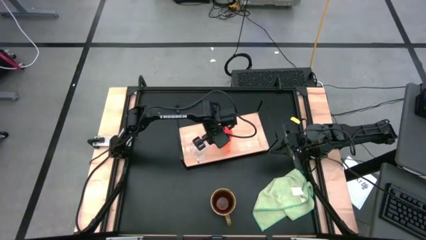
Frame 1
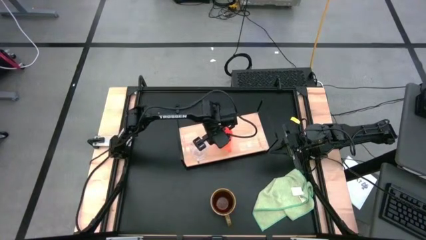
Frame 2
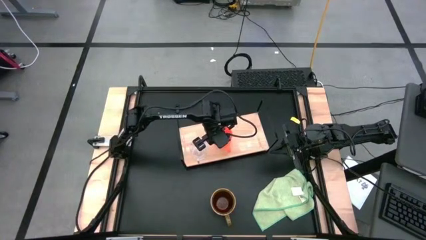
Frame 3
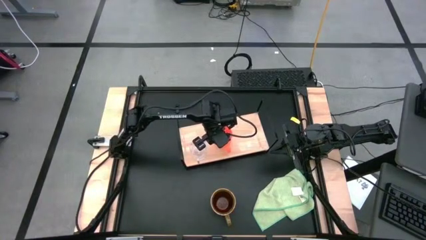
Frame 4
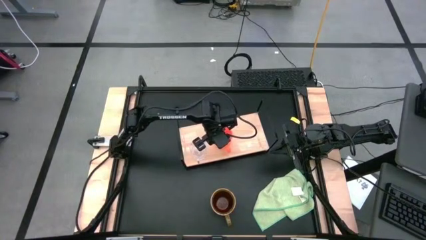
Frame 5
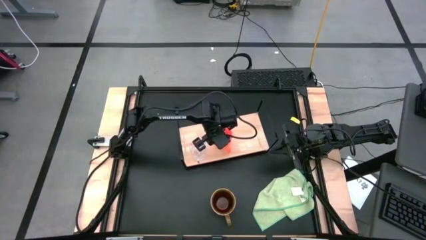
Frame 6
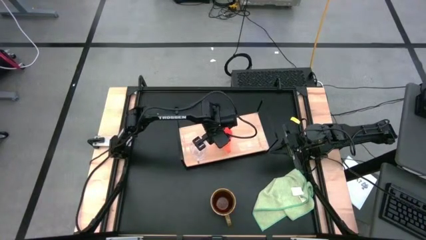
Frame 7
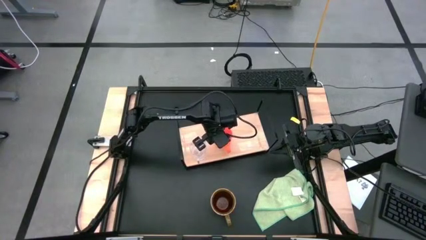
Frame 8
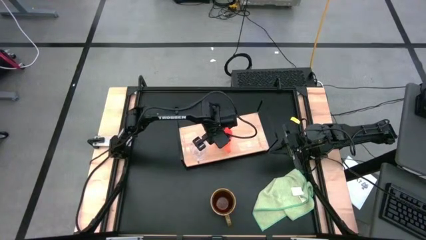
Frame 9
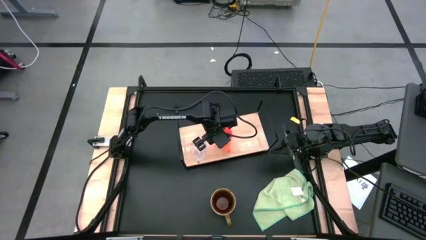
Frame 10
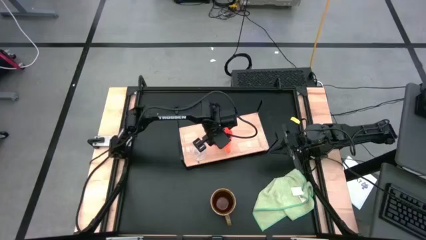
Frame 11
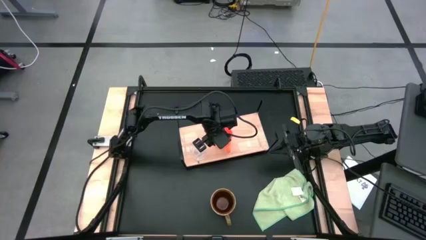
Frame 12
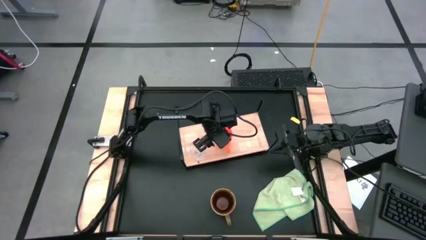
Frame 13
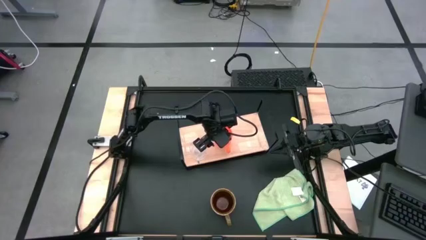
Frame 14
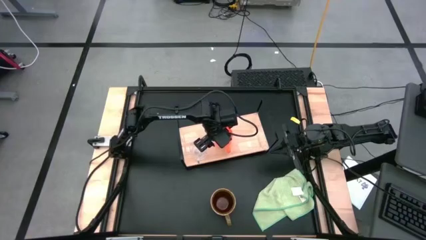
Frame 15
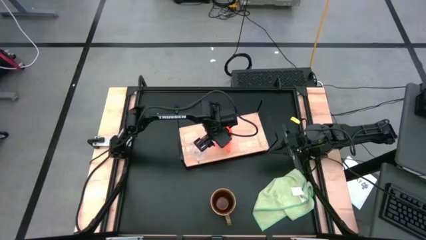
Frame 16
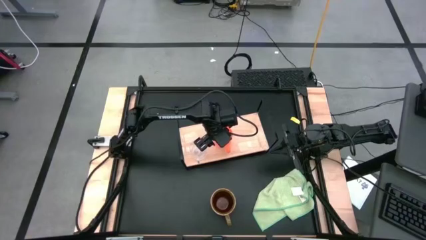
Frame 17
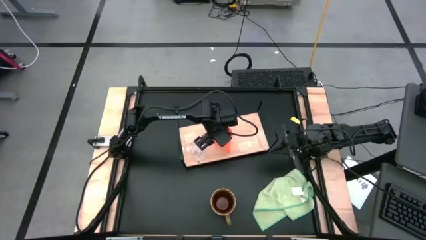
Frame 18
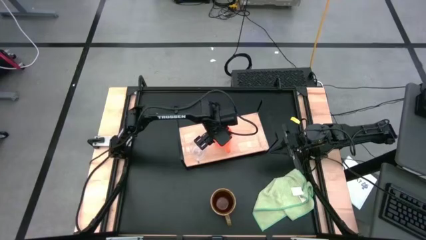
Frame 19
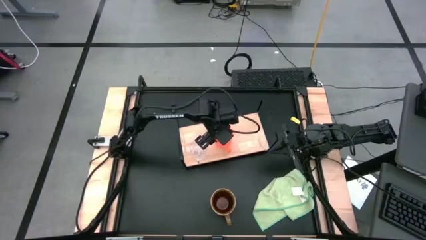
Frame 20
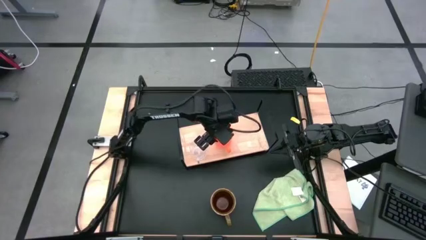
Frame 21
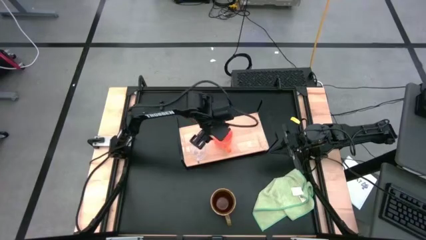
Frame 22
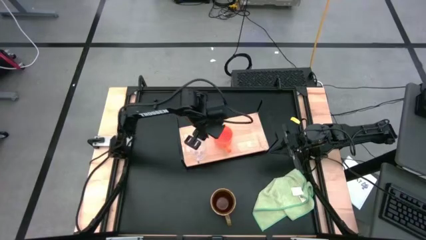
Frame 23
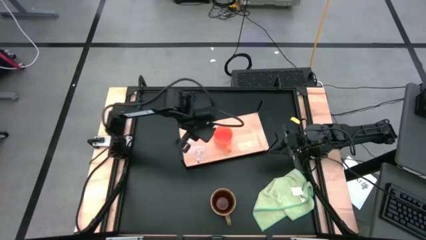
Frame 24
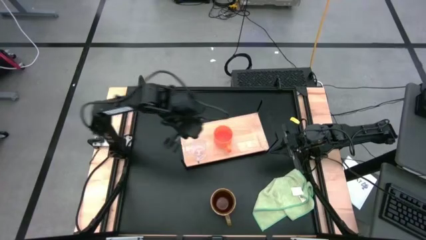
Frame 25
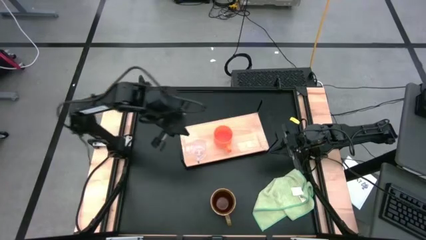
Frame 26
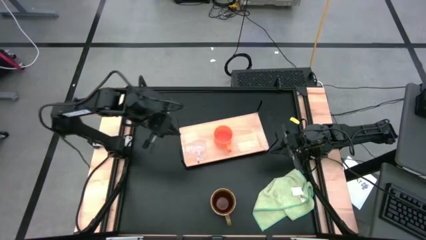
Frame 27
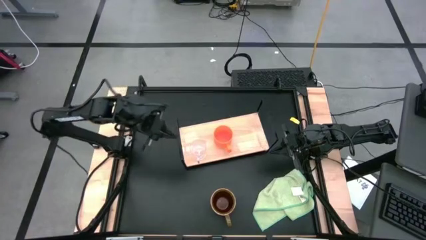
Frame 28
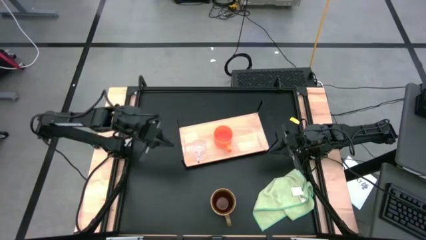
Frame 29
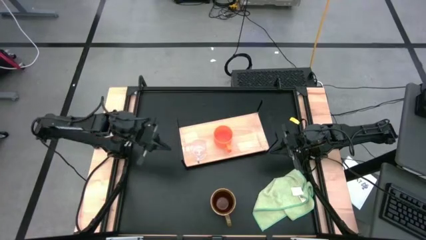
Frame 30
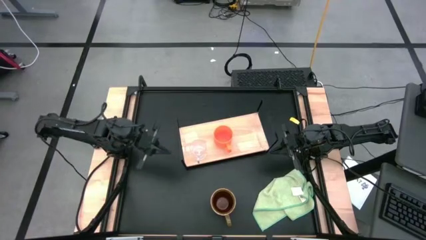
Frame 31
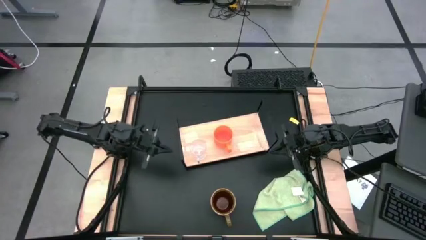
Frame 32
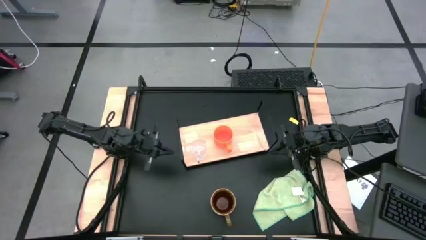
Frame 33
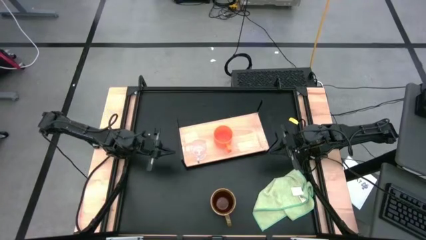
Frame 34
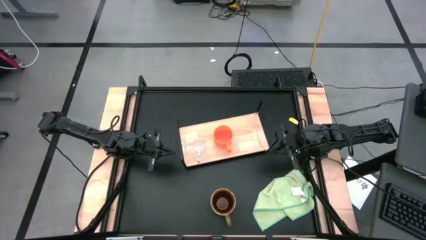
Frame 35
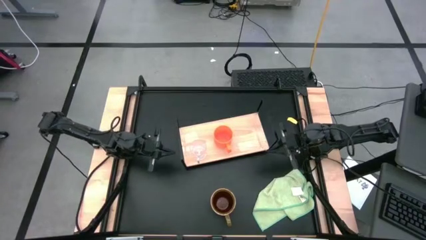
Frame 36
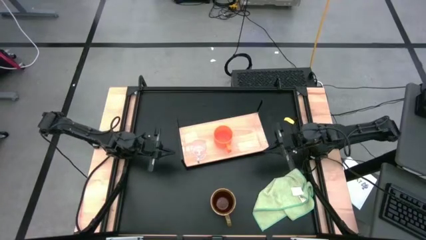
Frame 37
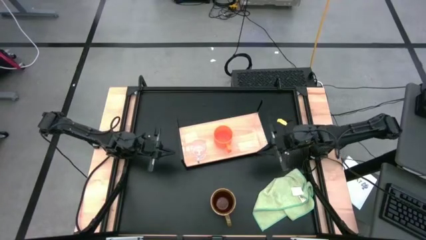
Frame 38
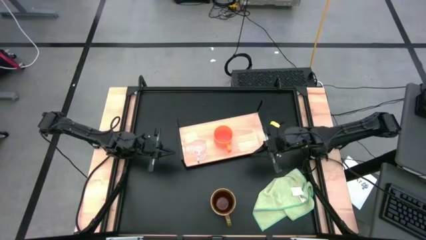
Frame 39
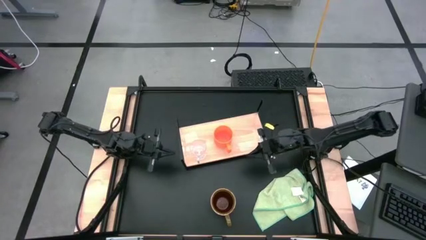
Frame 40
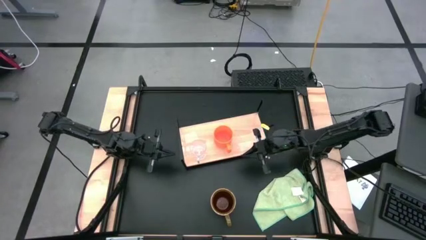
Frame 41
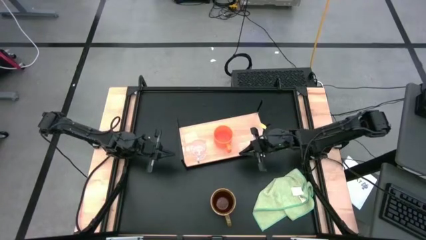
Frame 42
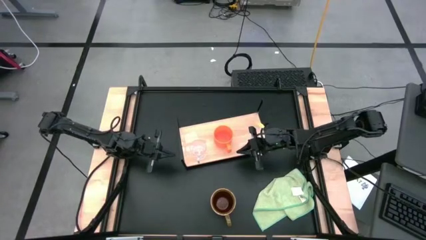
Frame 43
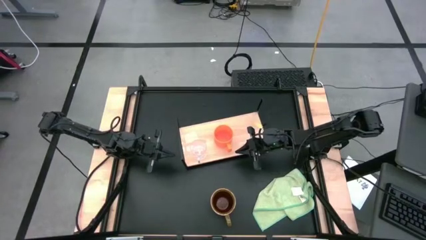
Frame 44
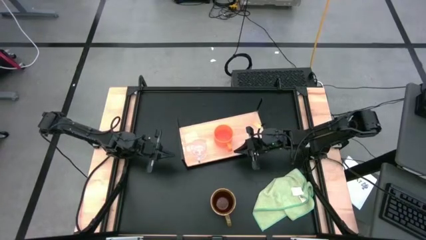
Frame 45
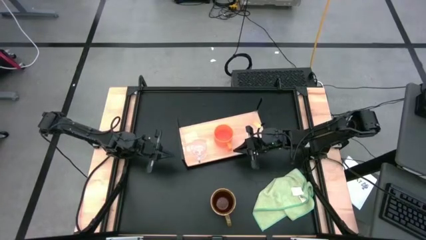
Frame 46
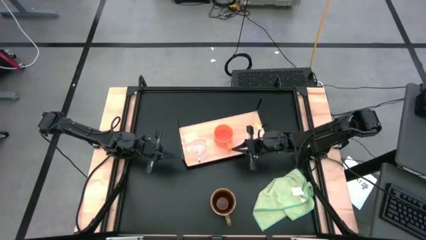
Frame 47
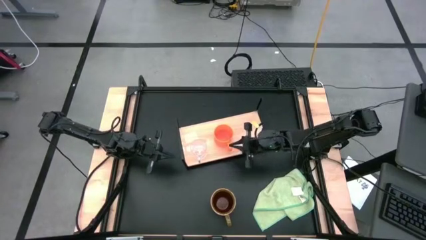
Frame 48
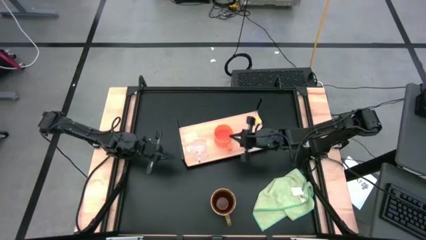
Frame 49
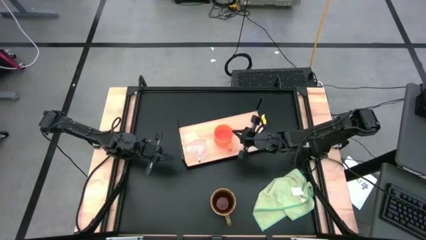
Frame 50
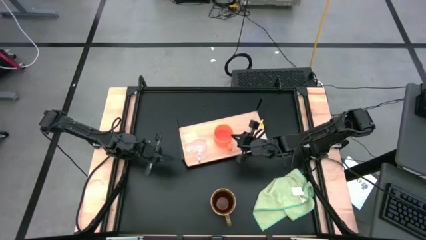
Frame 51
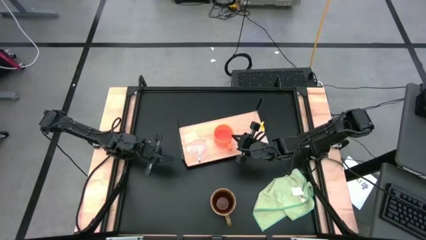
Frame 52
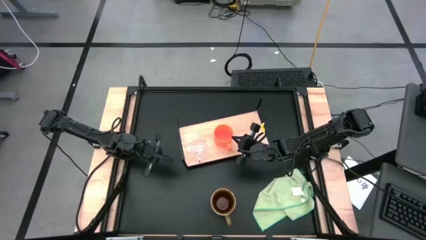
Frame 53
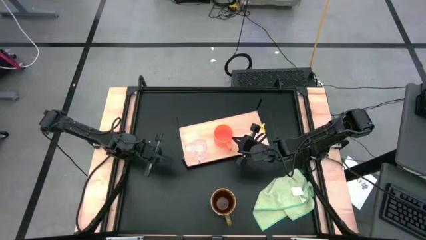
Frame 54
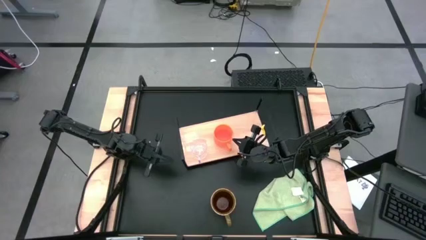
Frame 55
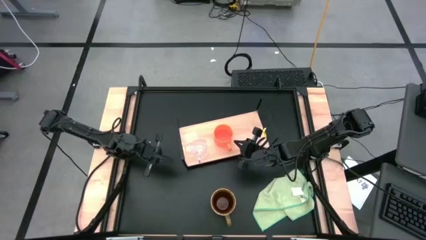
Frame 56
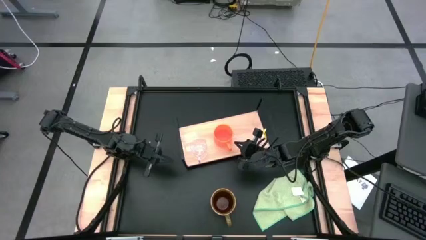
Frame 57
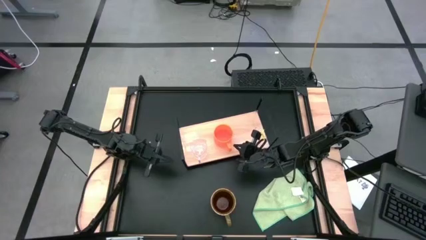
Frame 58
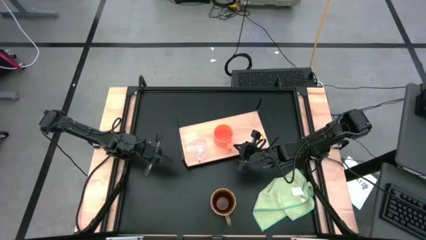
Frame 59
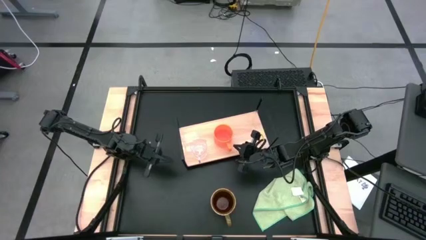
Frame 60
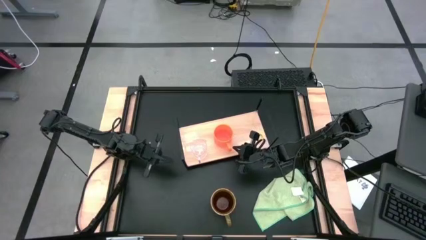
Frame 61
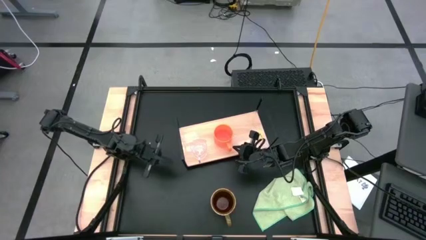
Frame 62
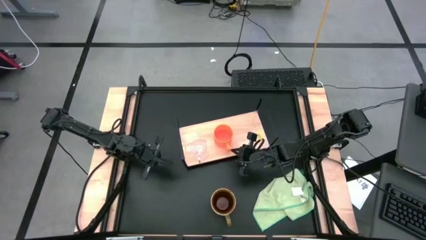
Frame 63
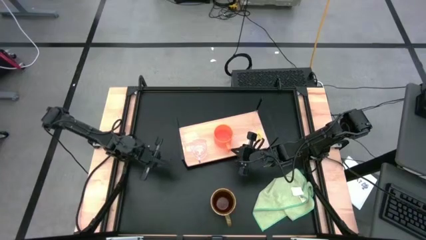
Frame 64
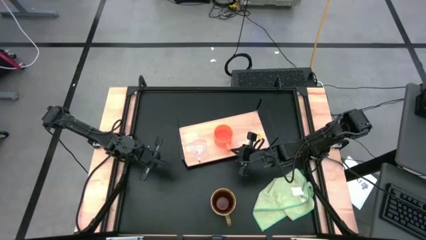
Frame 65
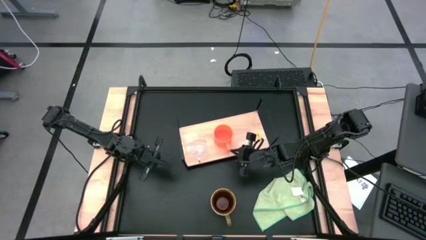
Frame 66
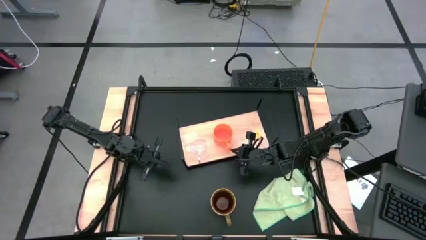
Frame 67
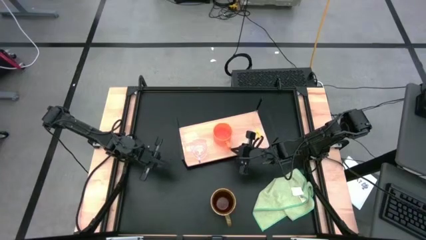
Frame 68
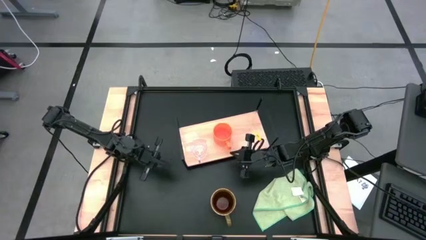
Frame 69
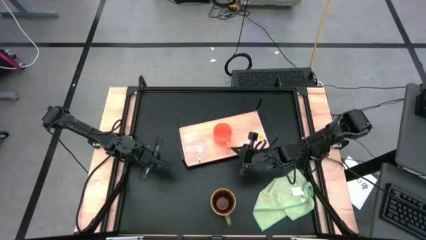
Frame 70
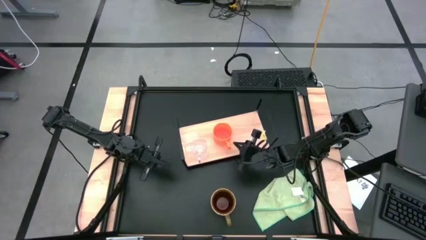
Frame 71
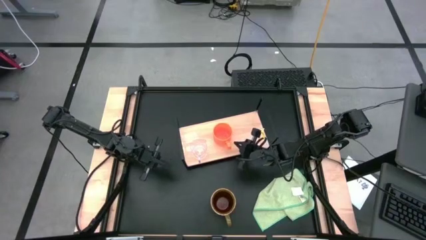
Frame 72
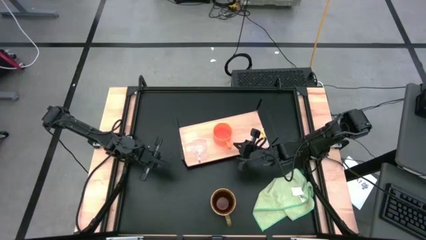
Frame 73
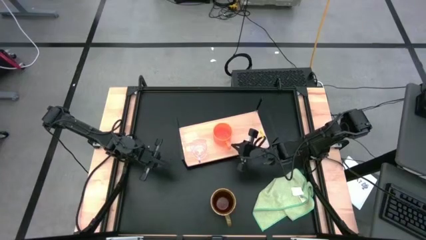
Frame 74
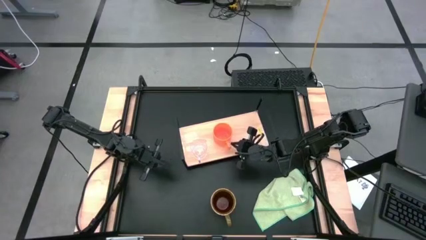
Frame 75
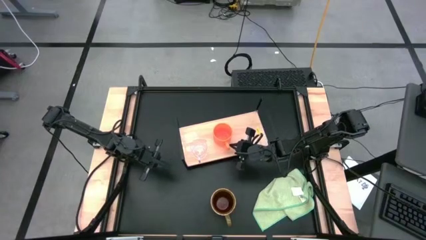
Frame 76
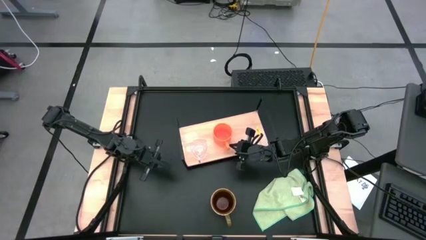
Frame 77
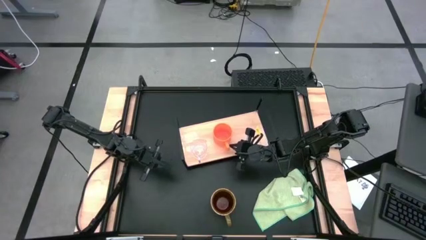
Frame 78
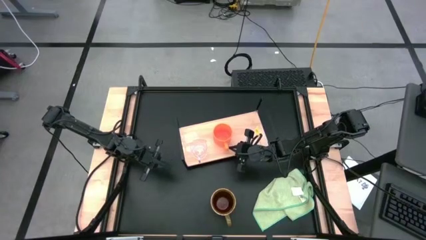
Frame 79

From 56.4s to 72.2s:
Task: Stack small to large cups/mugs on shelf
Put the orange mug on the shelf
